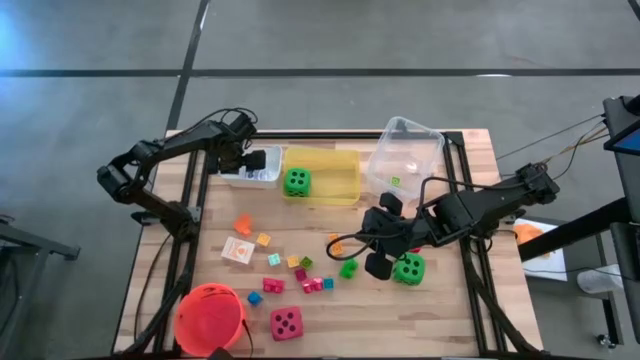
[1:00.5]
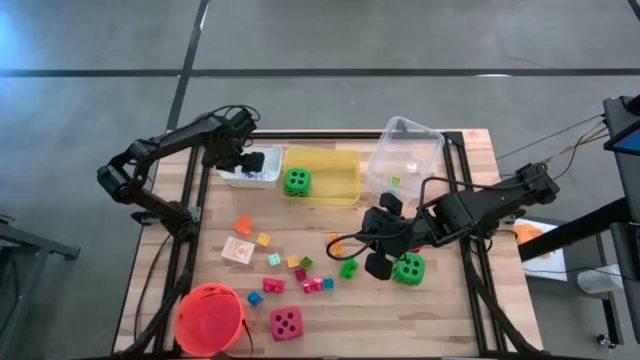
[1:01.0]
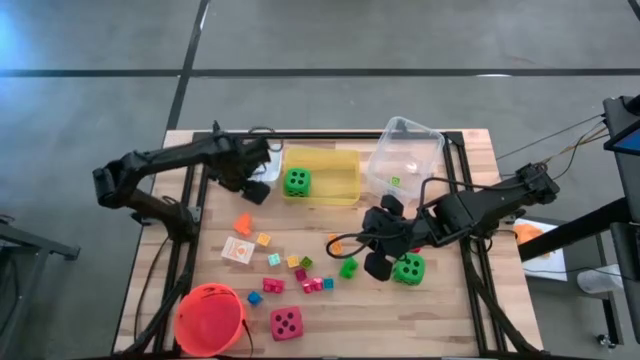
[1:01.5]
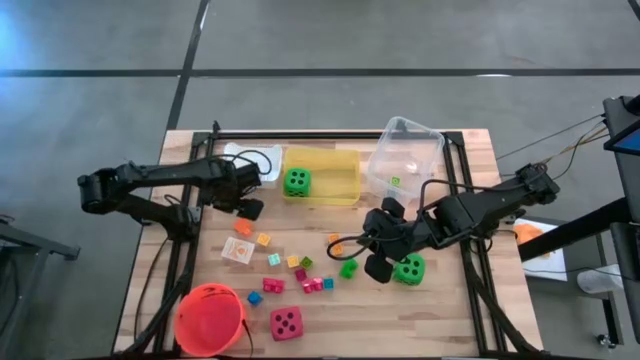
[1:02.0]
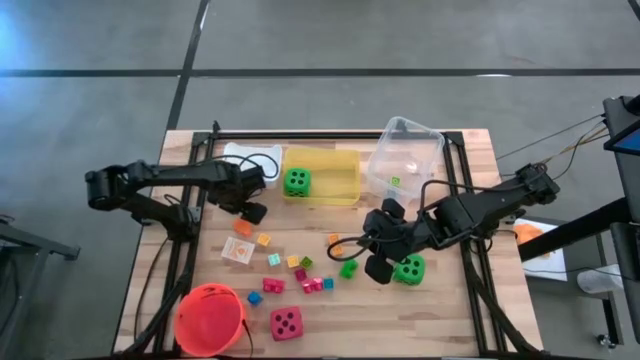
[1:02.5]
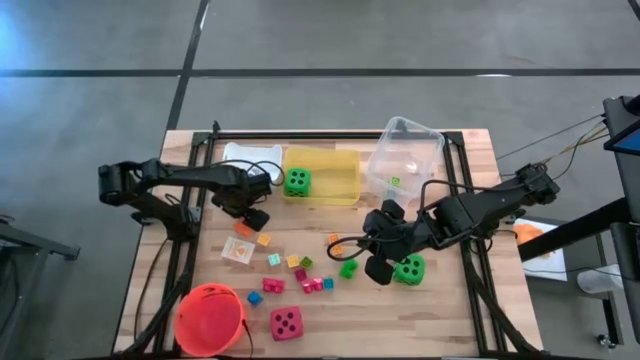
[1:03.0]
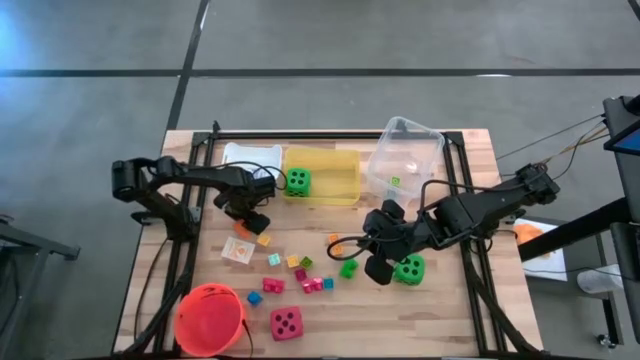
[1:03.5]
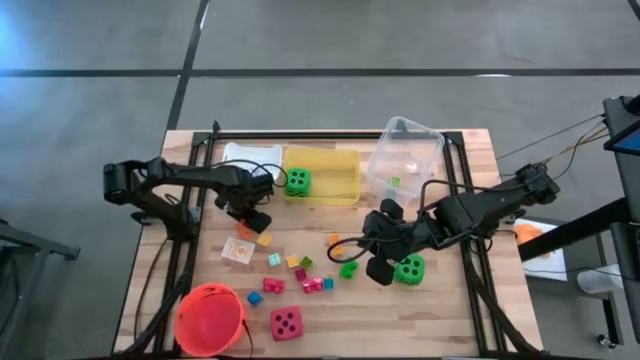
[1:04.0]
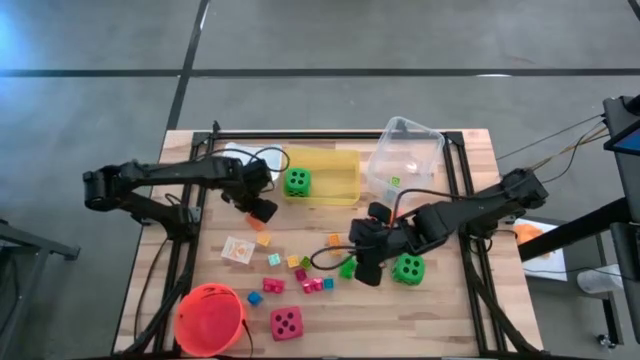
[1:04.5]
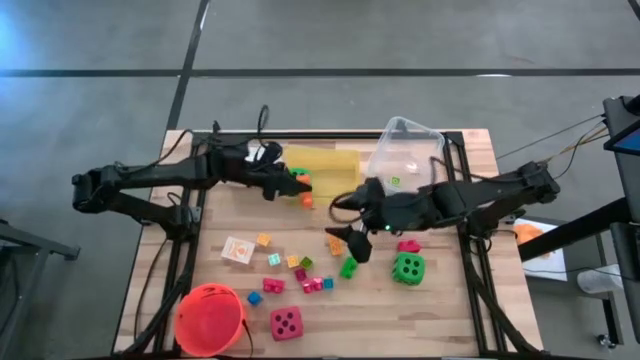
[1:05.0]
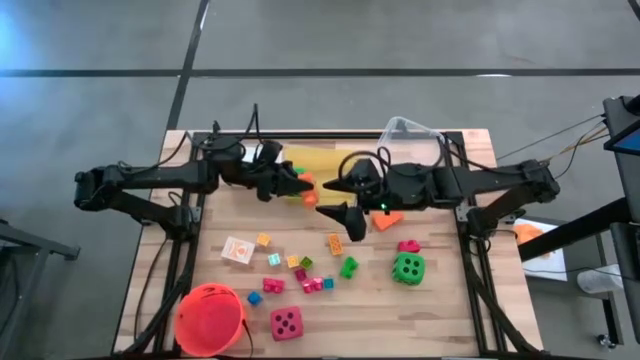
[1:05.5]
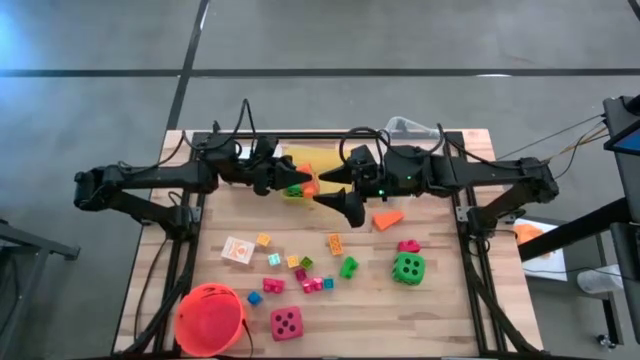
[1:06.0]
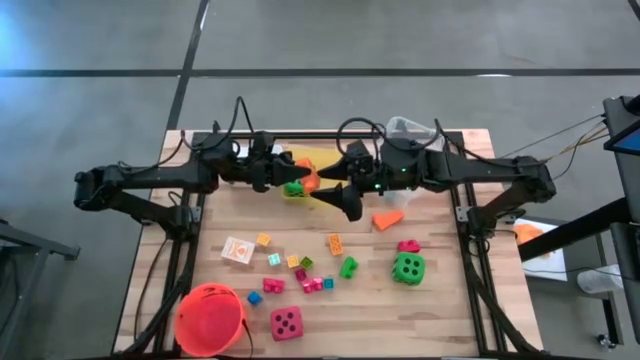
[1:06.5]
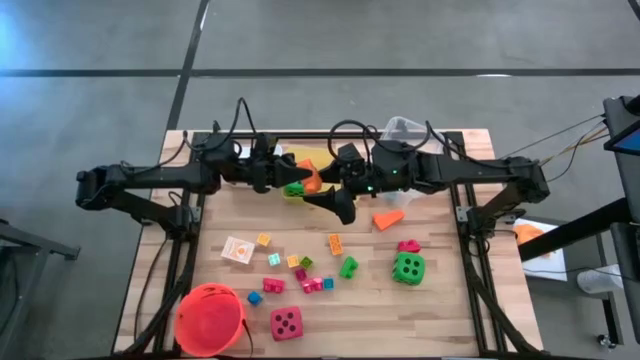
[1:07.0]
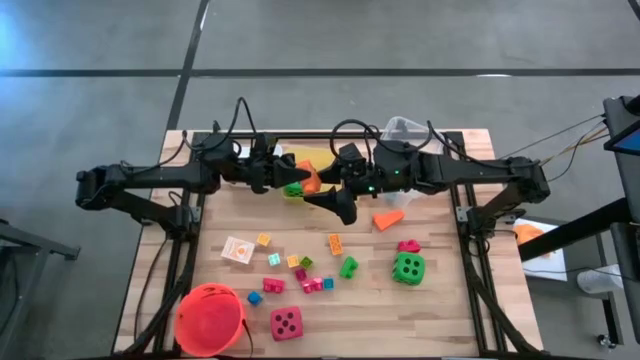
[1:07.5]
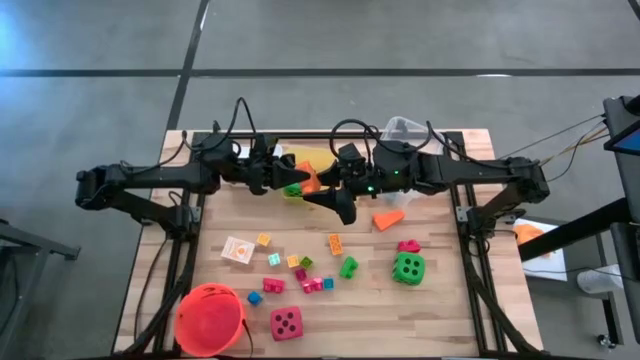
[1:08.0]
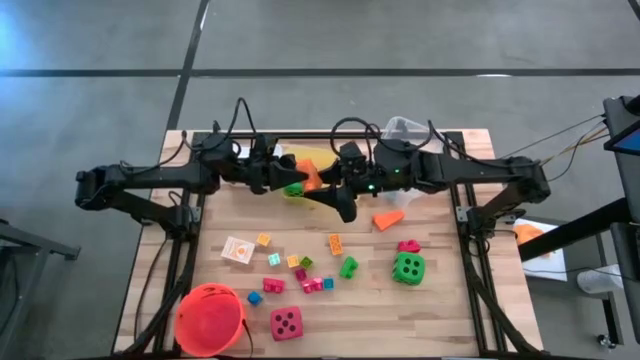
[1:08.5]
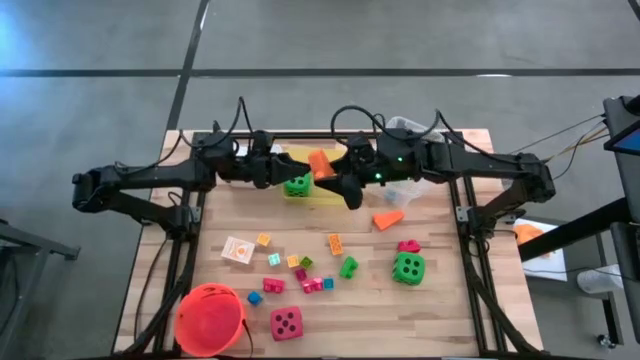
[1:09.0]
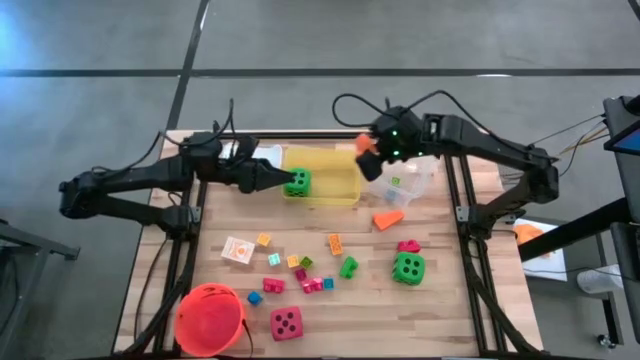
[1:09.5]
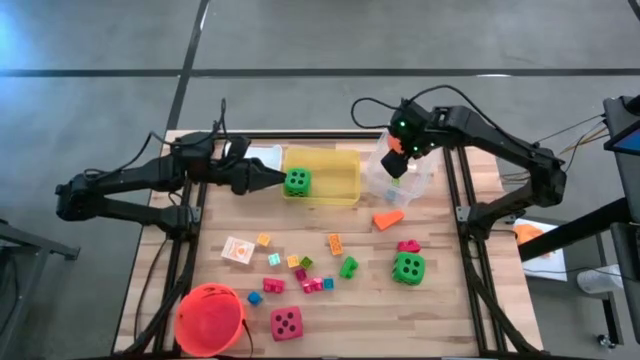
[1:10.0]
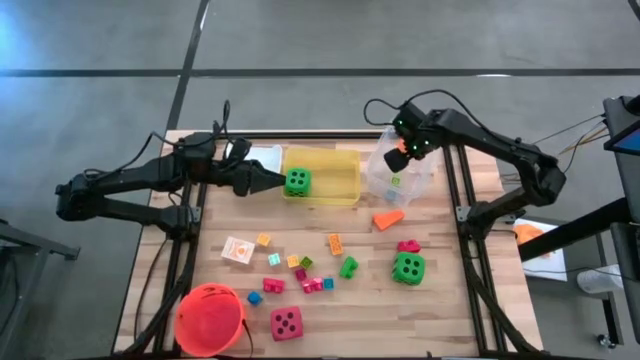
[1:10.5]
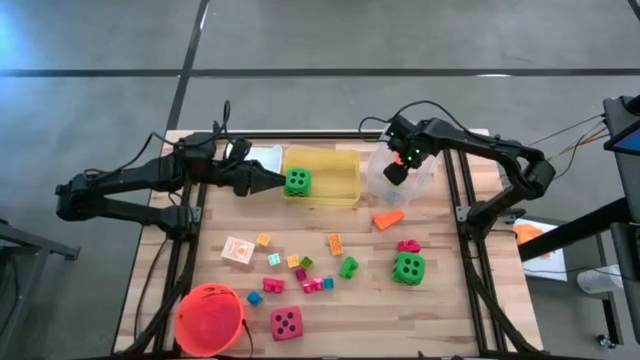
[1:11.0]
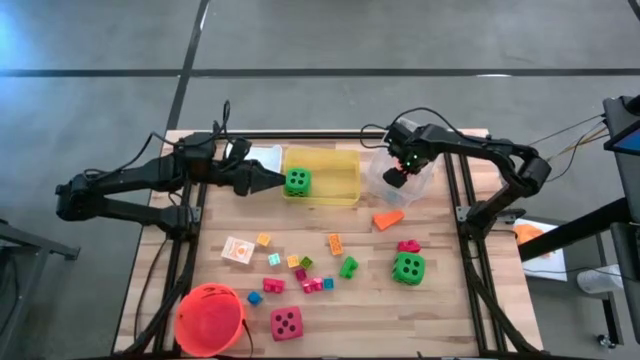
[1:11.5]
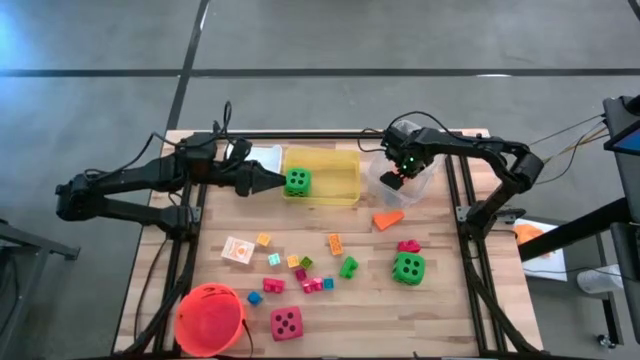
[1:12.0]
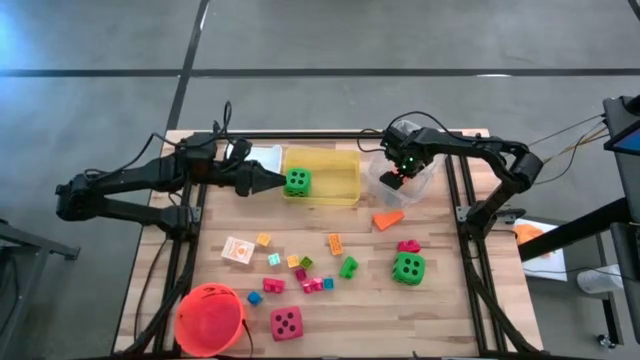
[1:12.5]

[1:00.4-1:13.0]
Task: Pick & Place Toys
Put the left orange game piece into the transparent bin

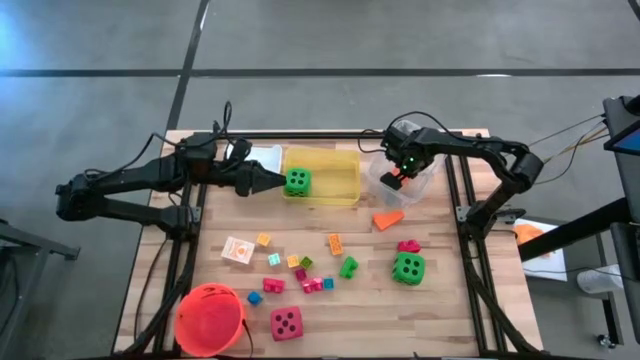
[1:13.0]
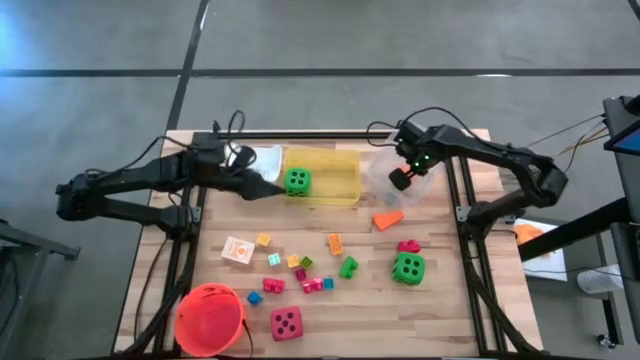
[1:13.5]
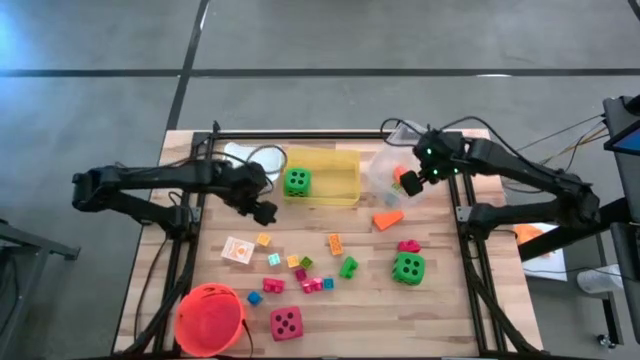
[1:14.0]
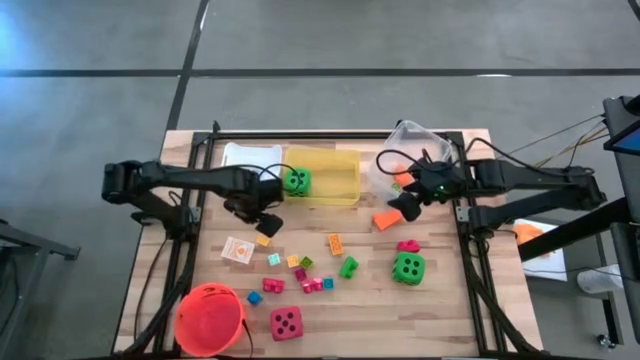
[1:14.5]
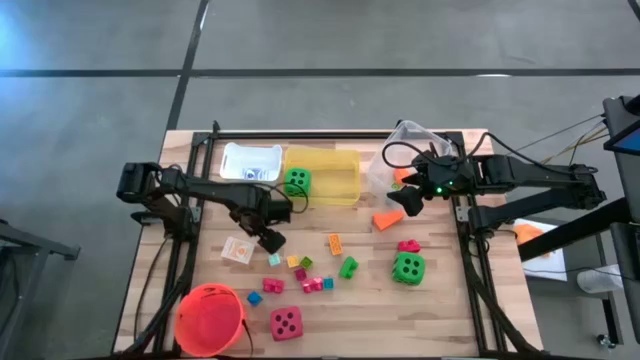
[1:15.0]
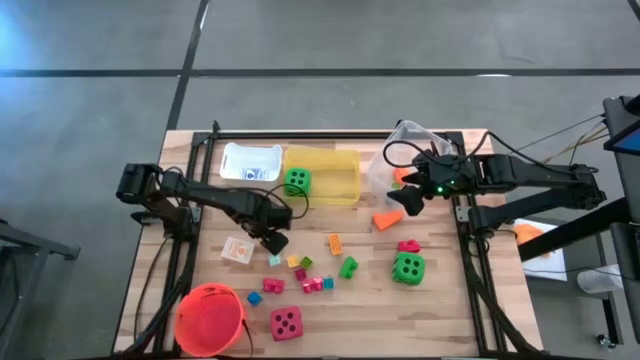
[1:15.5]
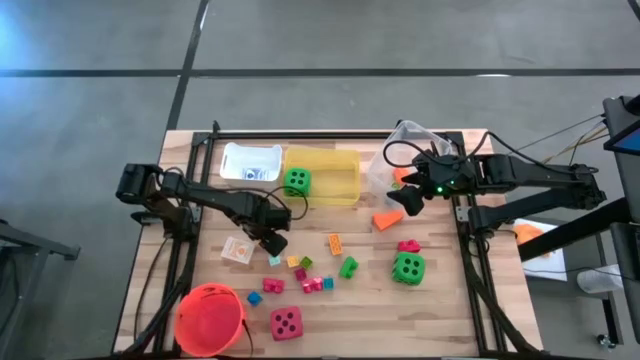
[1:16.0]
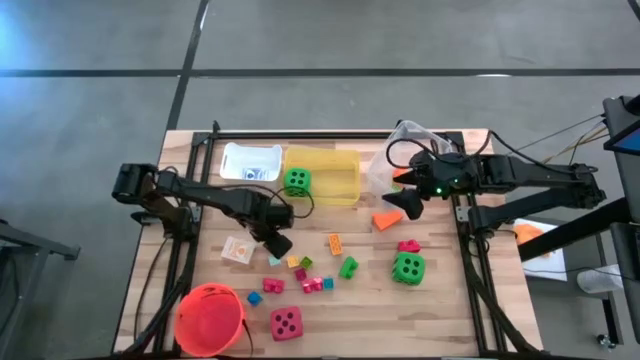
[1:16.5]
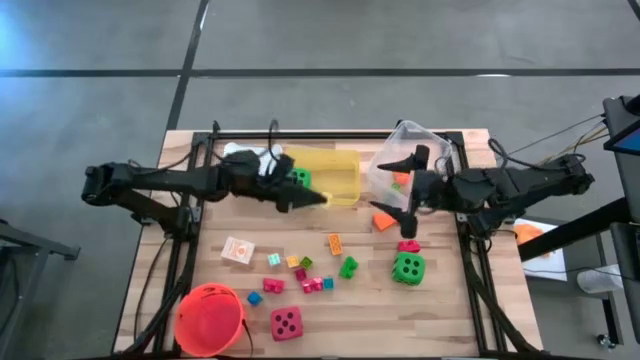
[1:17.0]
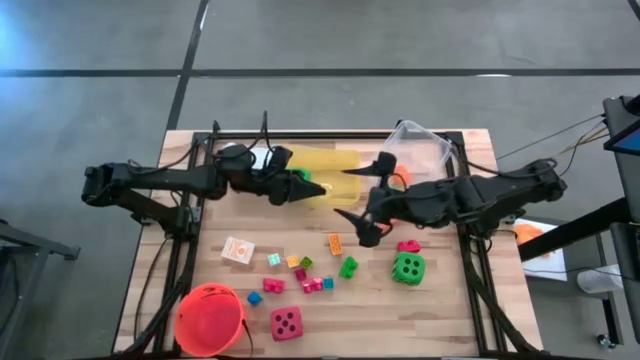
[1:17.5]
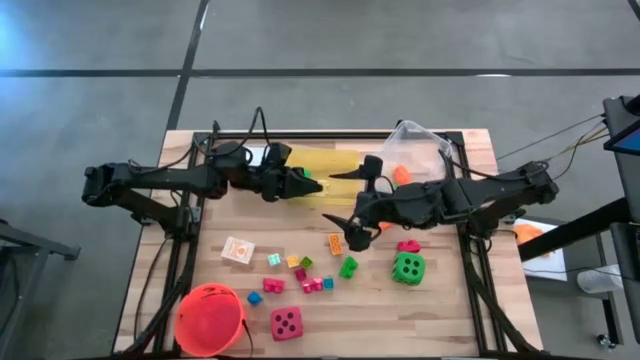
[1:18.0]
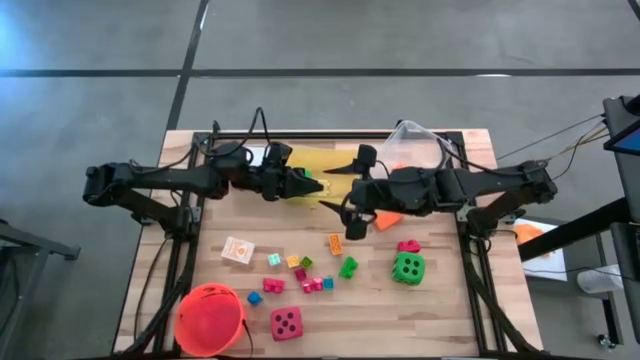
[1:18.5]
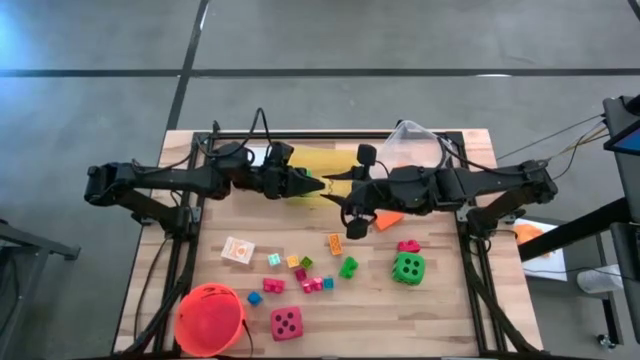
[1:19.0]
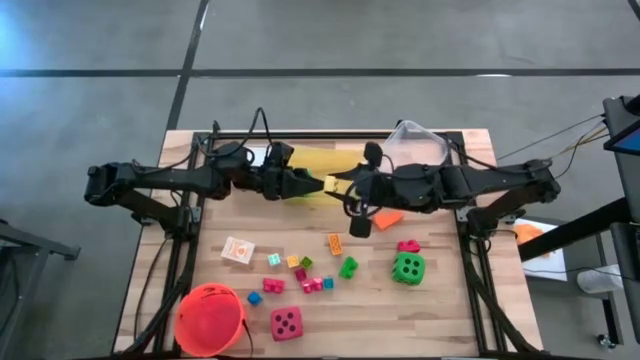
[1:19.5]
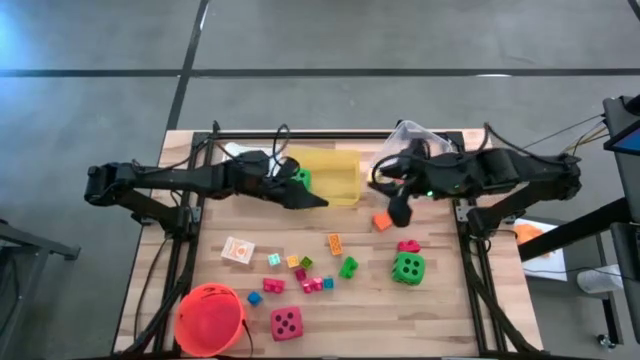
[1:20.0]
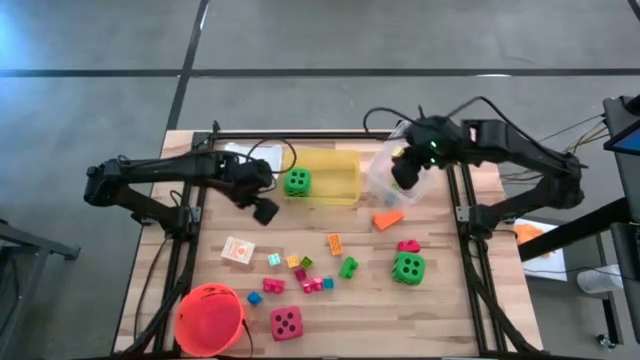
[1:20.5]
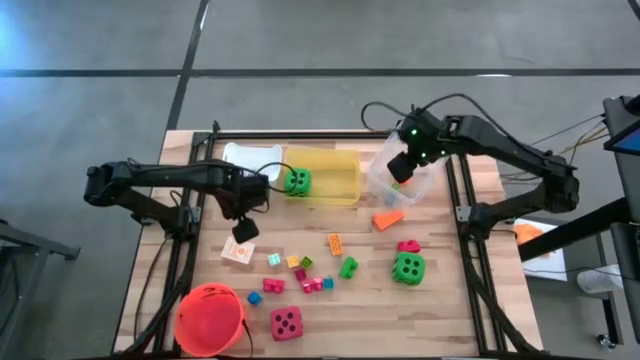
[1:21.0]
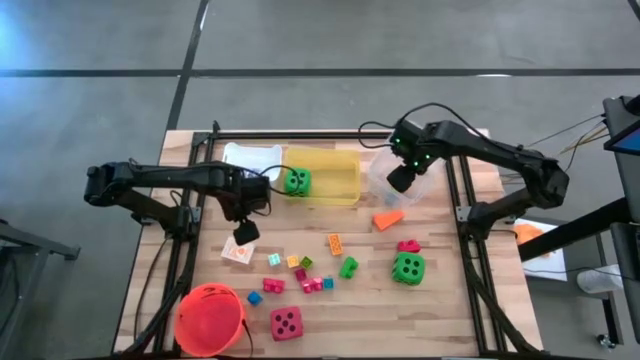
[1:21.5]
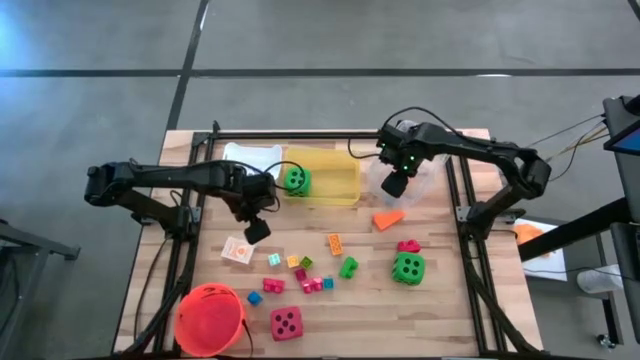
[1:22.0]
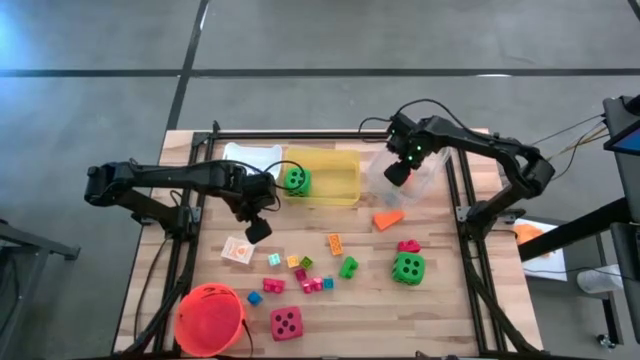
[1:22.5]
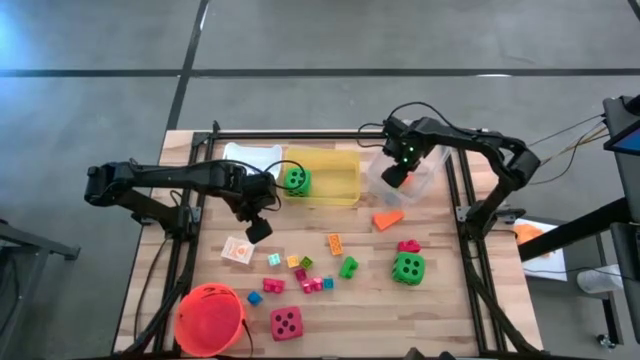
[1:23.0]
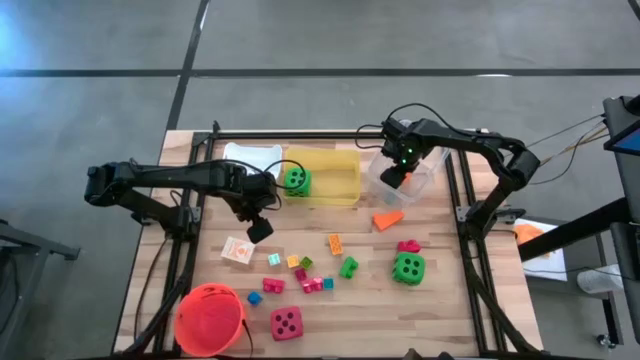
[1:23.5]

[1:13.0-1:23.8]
Put the top yellow game piece into the transparent bin
